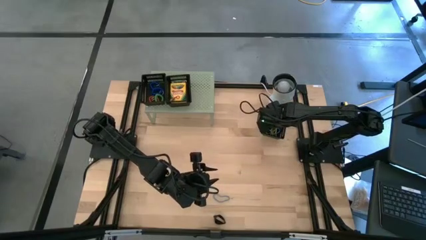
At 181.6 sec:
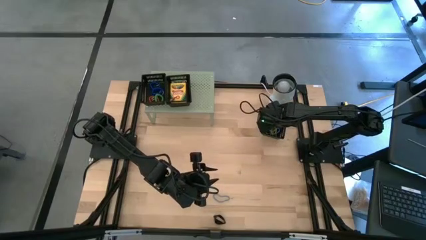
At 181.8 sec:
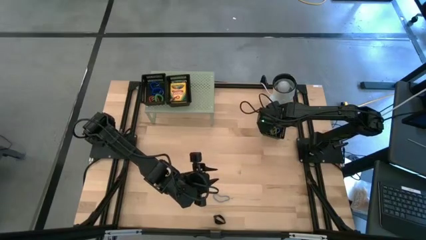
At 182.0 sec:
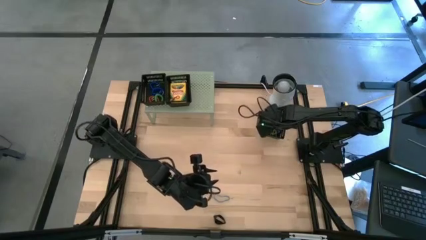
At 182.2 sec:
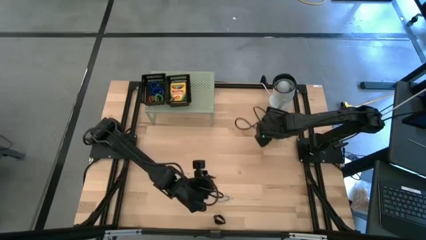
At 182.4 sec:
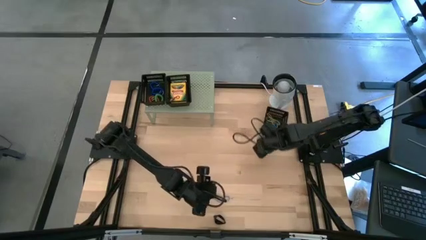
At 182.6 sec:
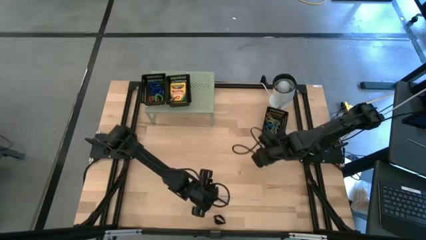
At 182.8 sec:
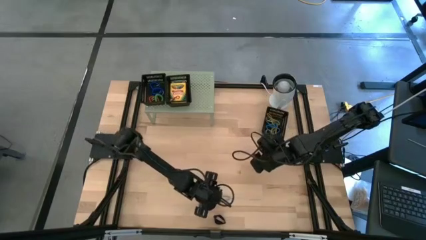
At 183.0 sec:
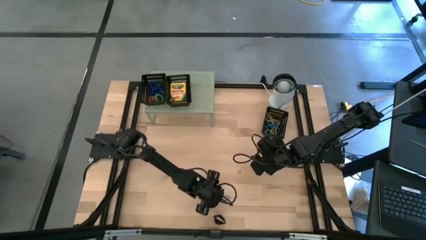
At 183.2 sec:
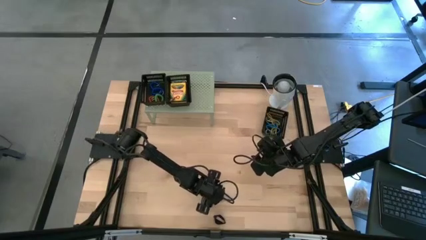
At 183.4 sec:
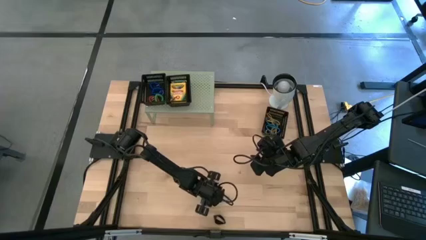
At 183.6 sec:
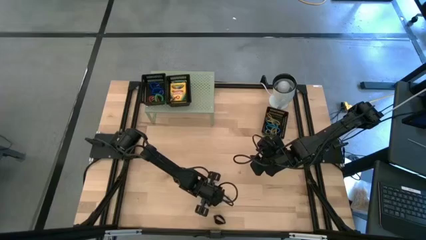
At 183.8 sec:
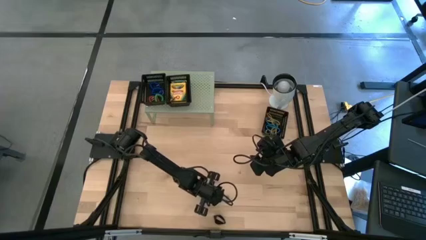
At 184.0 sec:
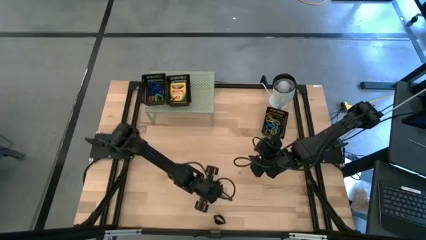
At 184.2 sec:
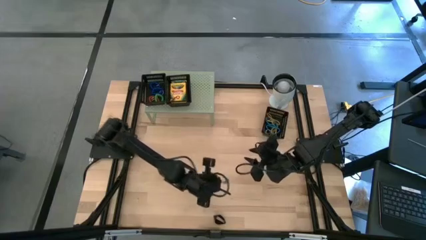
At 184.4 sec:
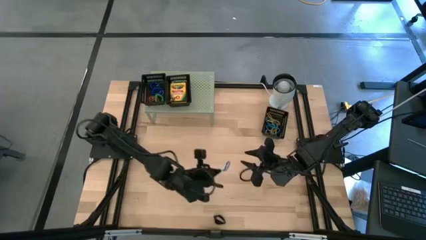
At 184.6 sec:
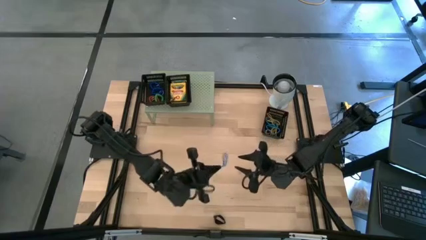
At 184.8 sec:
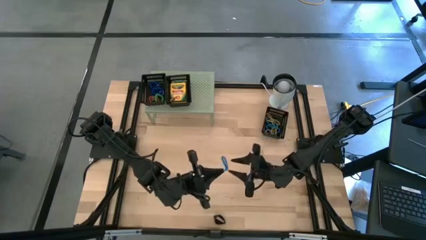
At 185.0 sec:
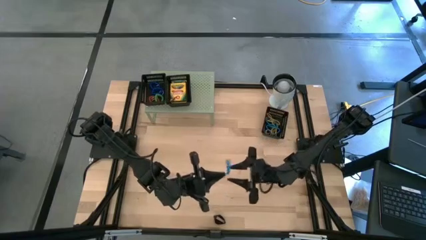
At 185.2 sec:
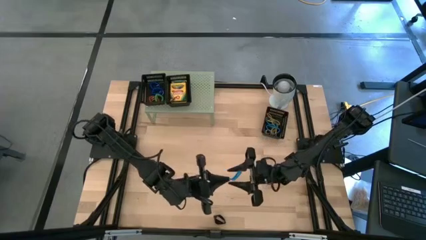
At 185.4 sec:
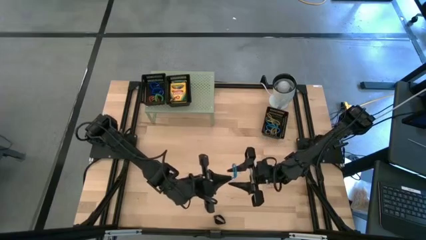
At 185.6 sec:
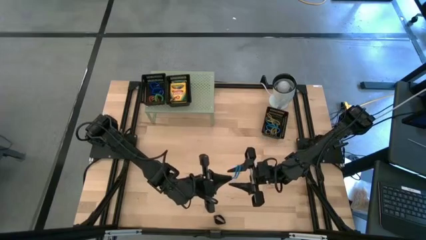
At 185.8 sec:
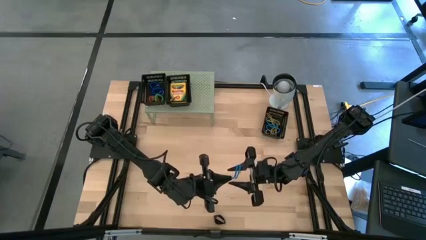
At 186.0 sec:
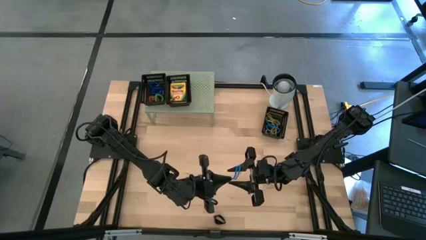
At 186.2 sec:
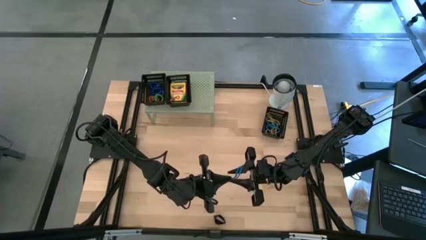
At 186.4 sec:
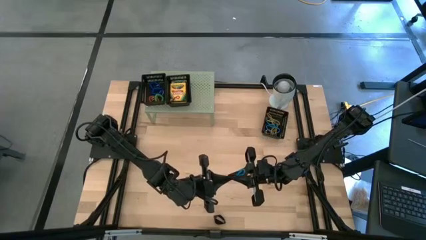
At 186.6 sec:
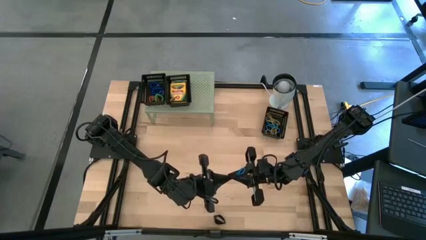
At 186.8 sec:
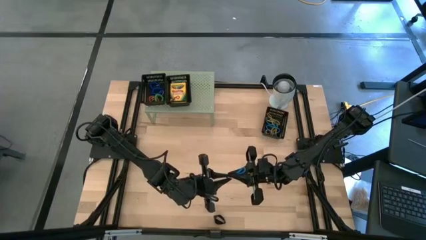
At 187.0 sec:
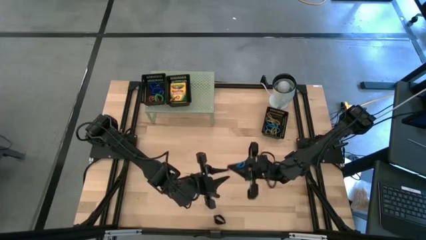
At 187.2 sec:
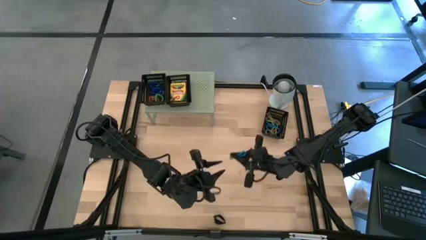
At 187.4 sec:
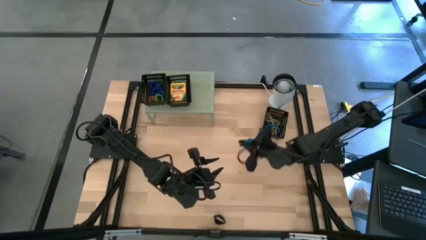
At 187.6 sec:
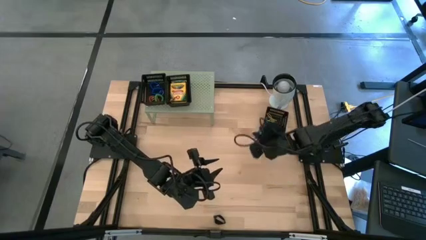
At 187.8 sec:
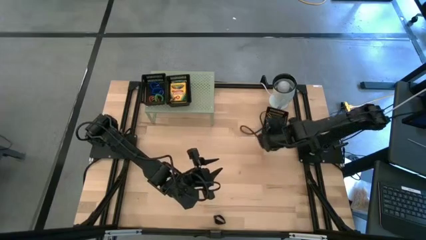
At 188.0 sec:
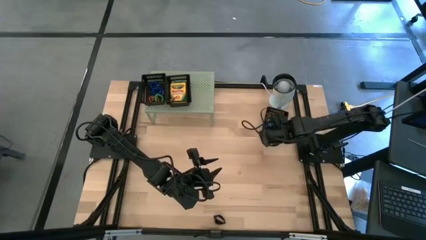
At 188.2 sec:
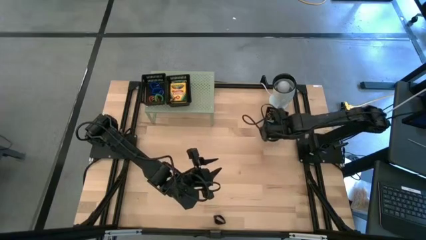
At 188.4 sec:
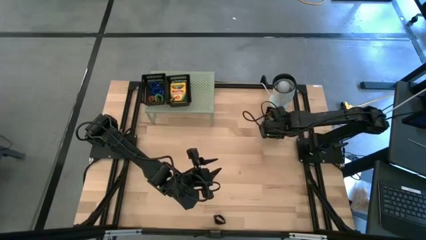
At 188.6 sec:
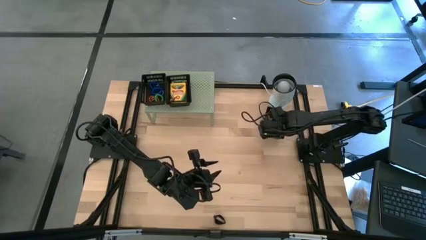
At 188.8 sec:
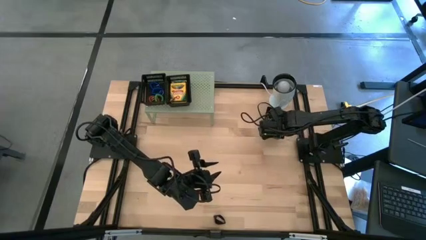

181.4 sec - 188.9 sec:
Task: Pick & Place Office Desk Supplies
Put the blue rubber band into the black bin

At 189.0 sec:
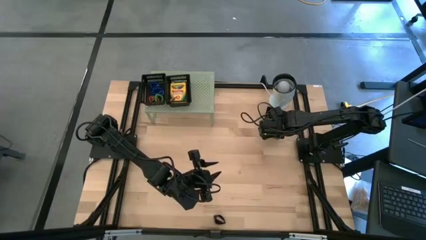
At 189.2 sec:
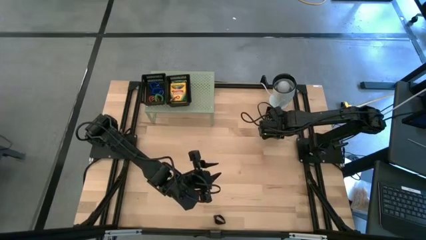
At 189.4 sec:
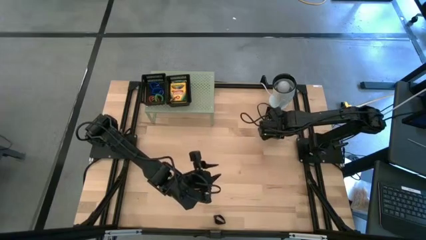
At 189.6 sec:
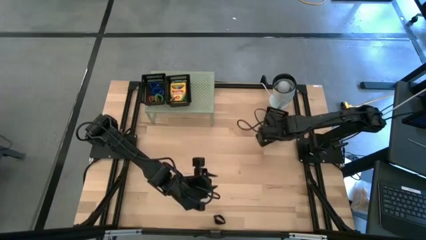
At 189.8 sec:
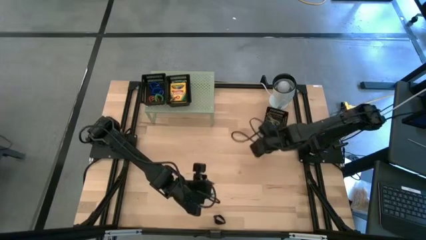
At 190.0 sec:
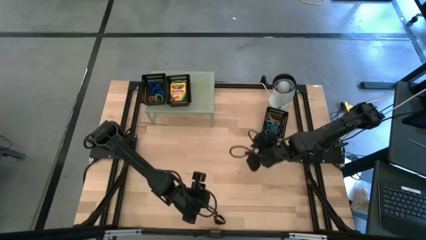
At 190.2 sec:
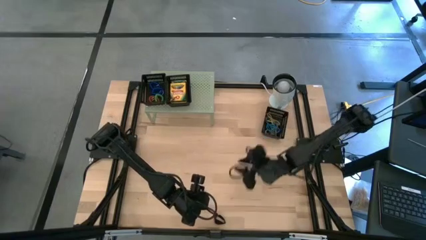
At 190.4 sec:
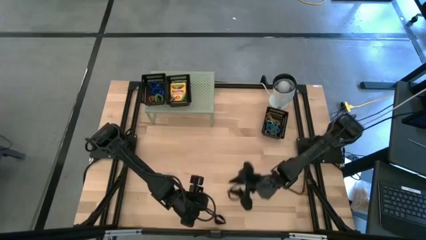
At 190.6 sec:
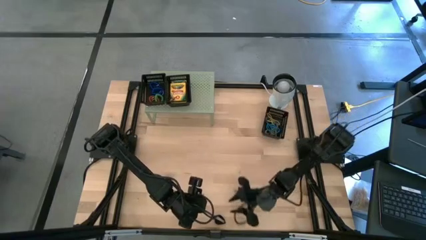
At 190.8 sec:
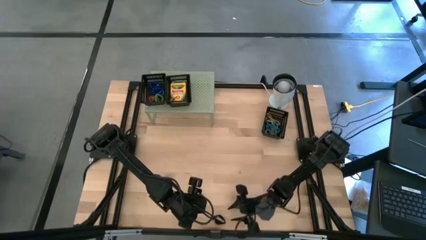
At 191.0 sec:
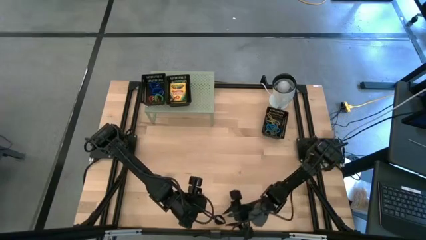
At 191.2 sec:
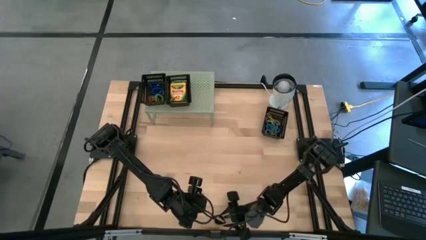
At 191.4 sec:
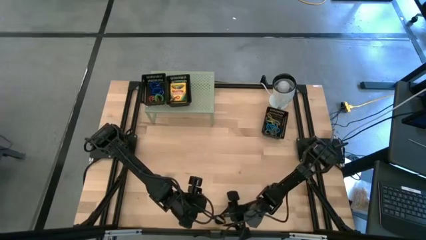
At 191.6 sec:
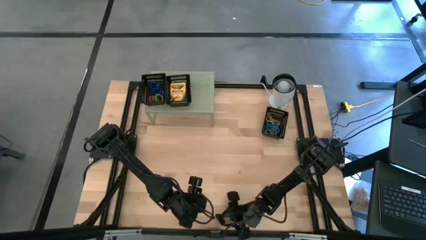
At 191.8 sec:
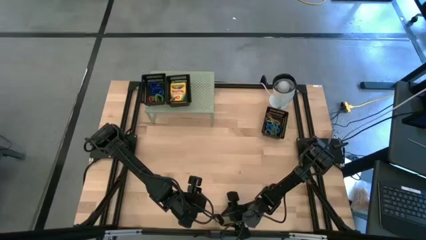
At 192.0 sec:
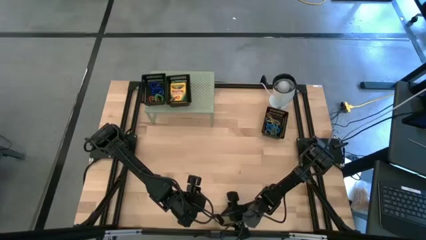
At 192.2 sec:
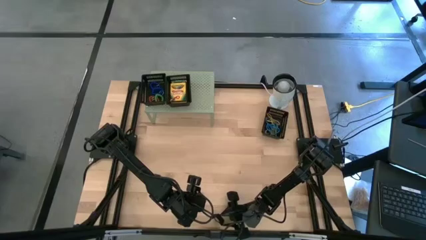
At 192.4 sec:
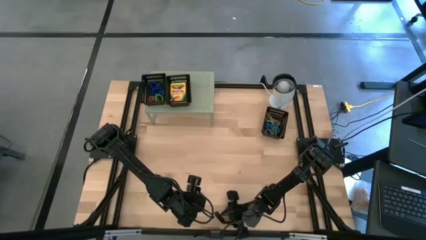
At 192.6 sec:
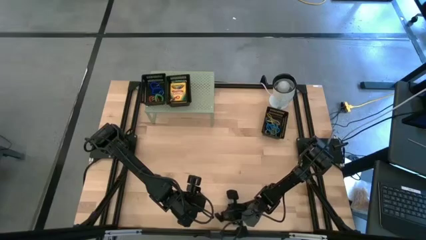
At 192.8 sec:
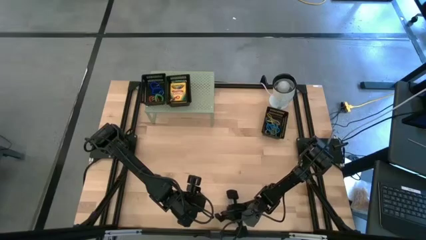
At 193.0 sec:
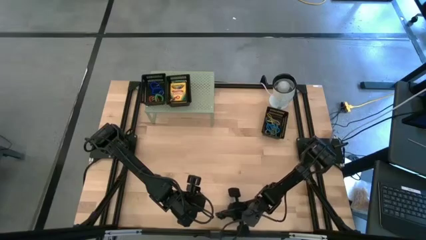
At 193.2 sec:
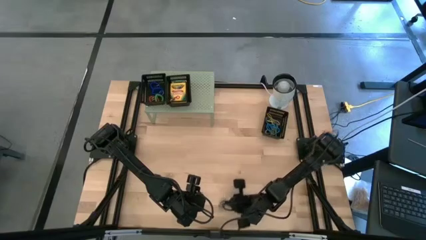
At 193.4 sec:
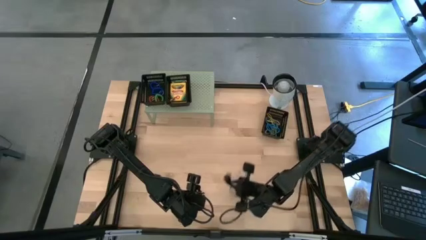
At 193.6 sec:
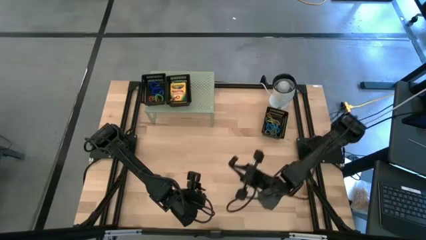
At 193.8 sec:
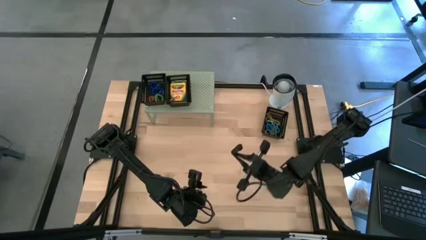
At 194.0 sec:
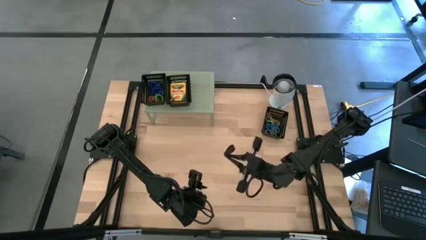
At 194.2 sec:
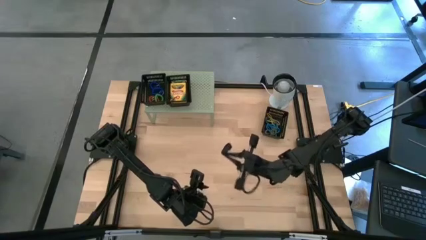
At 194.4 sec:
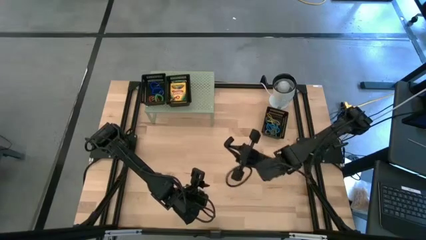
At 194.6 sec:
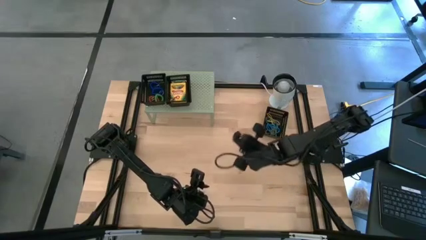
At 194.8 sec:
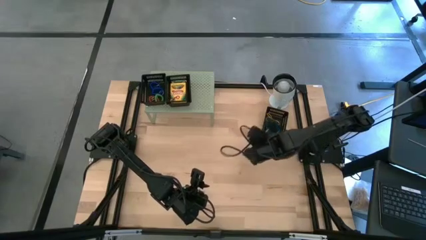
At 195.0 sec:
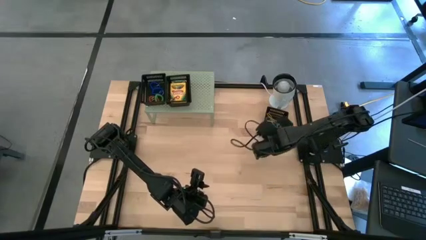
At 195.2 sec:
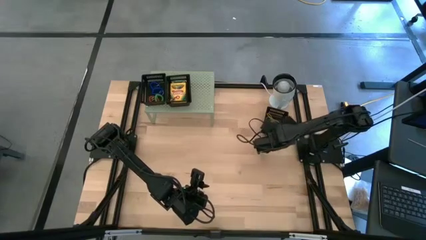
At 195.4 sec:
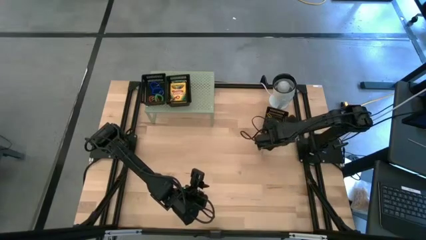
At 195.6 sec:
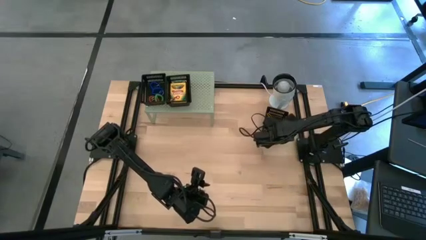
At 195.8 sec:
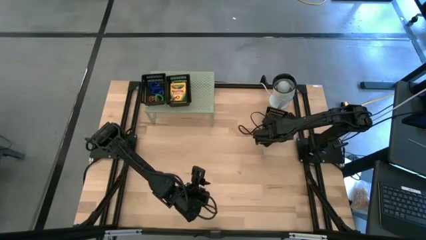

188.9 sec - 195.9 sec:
Put the black rubber band into the black bin
